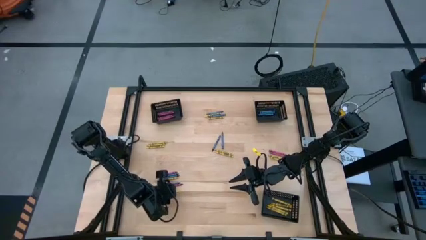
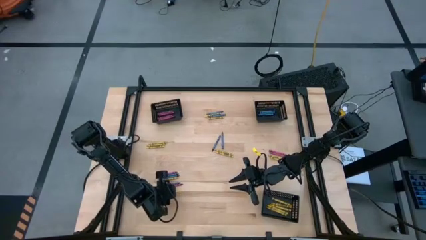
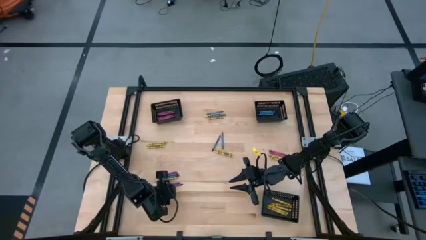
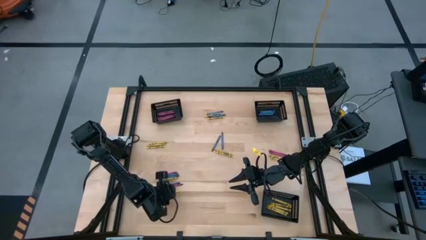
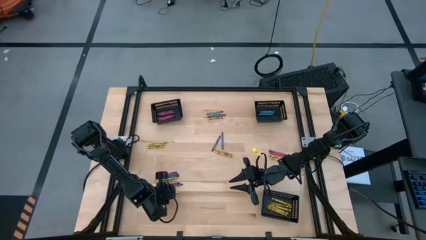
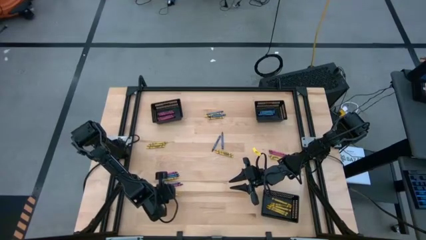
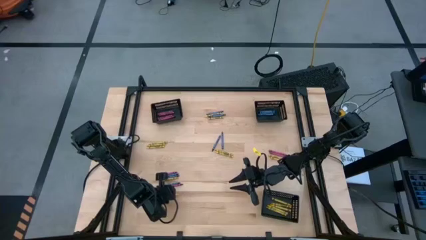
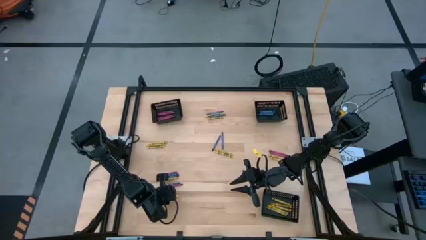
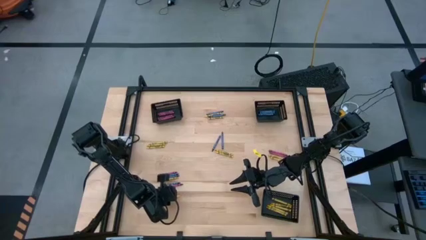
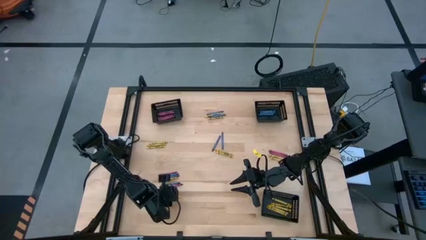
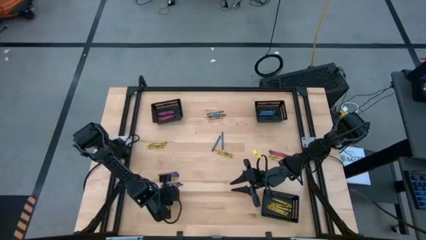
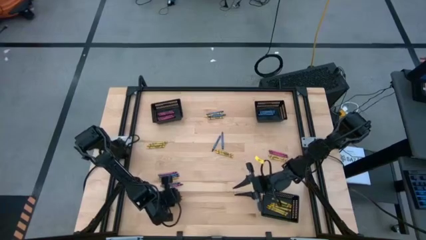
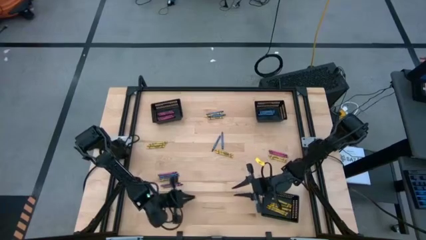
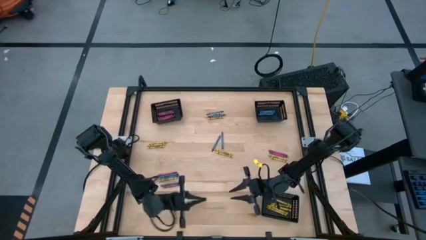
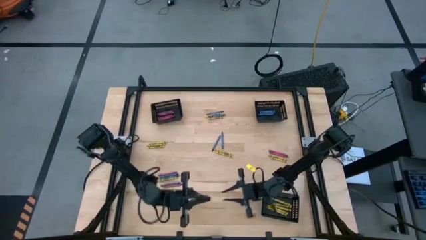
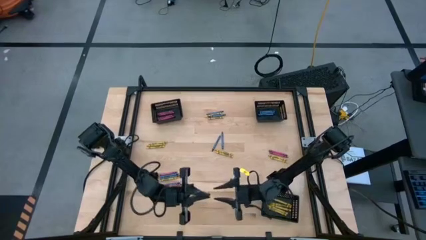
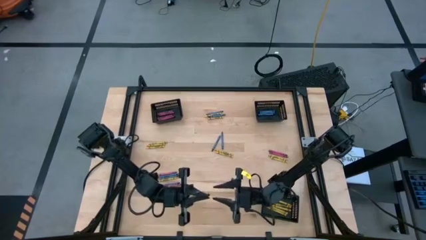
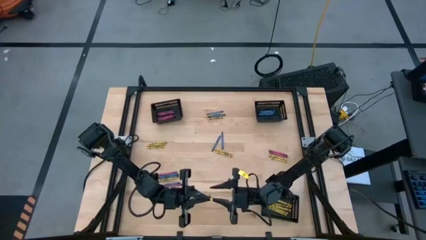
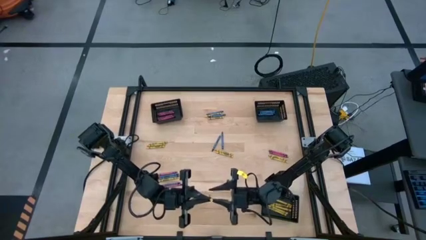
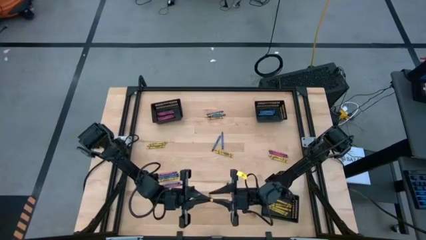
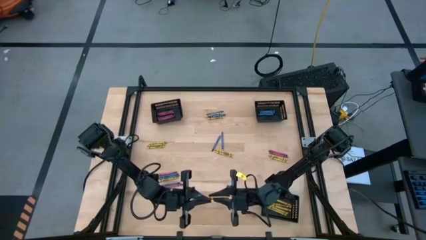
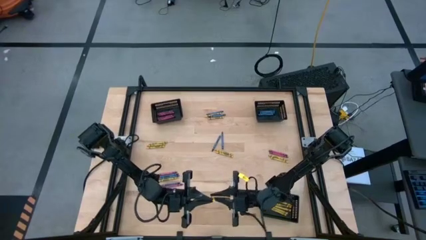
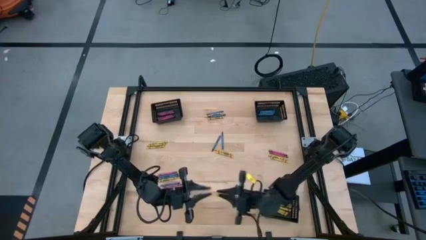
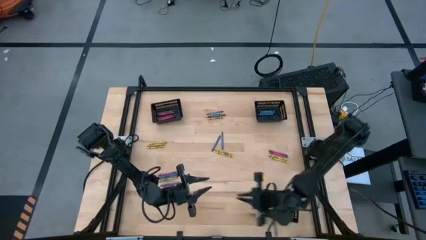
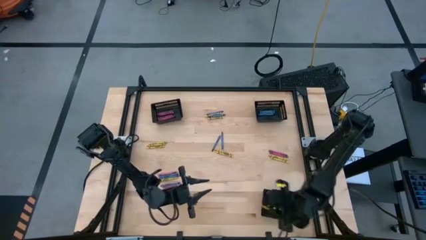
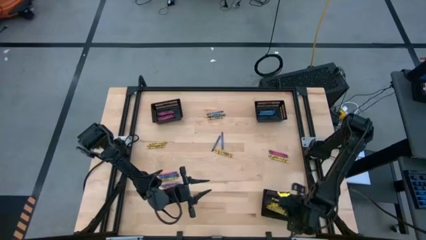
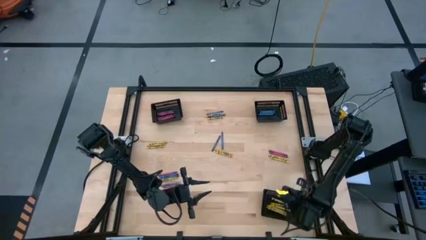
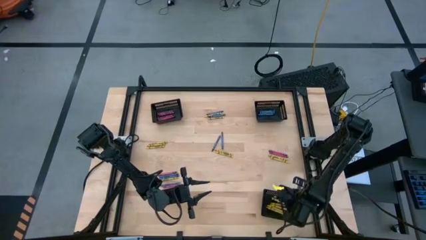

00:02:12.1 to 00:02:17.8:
Task: Sort crayons
Put the yellow crayon into the bottom black bin

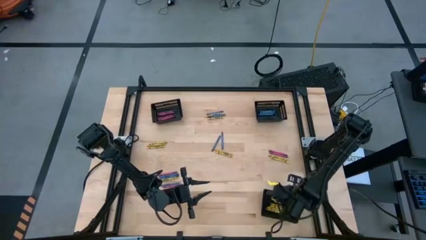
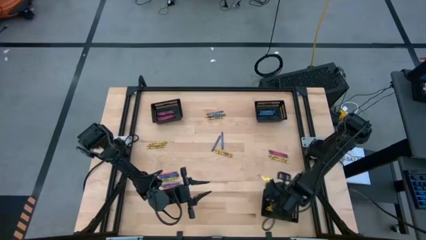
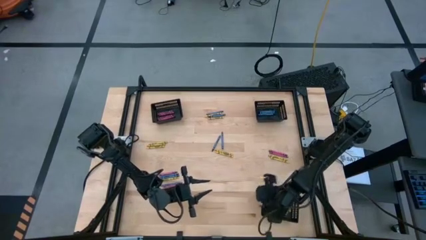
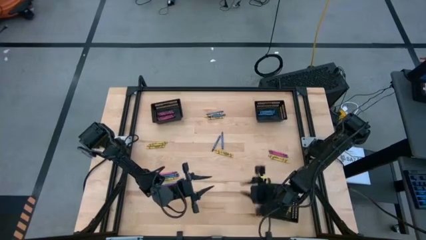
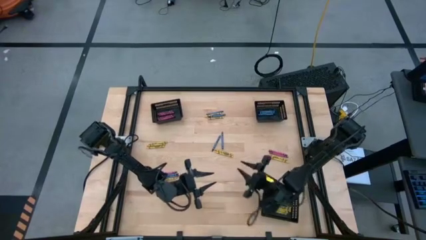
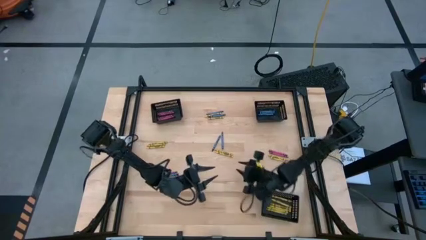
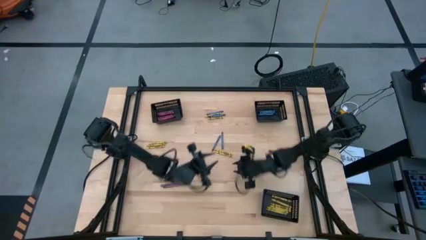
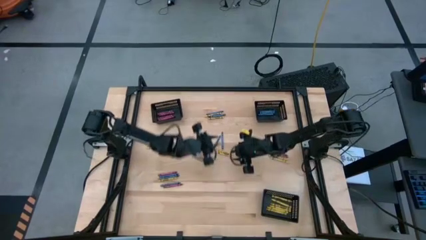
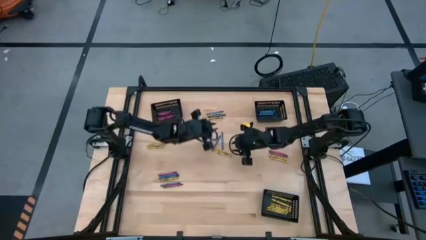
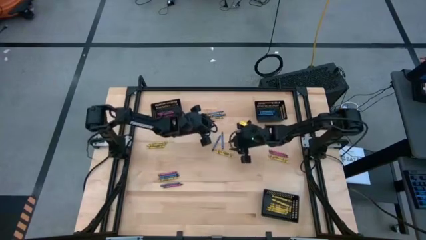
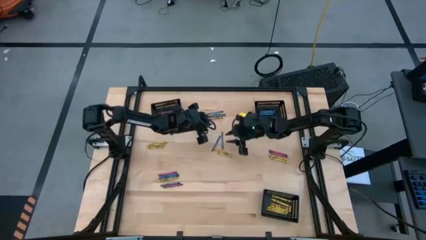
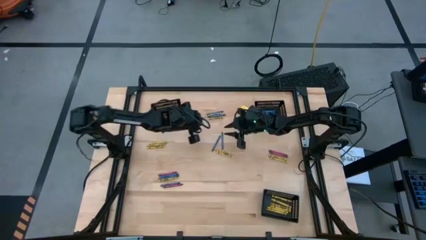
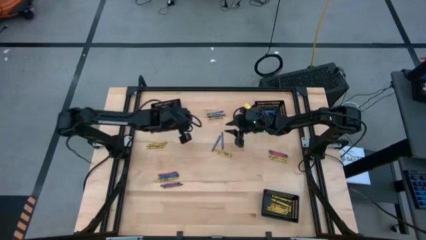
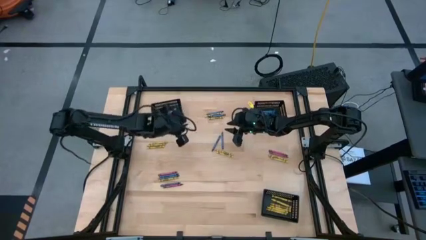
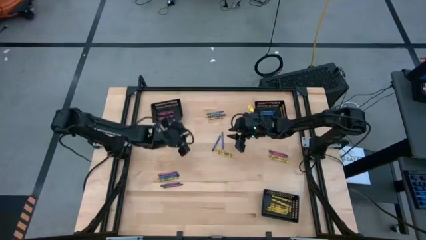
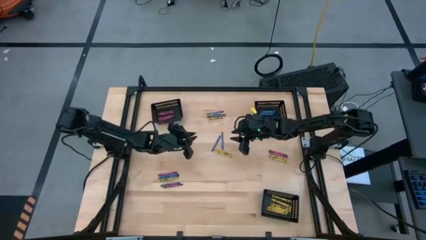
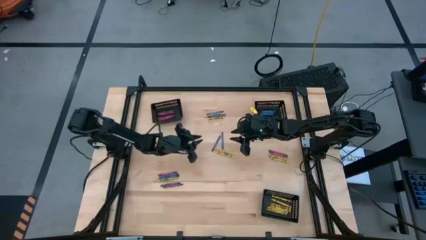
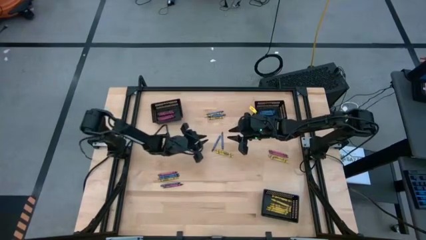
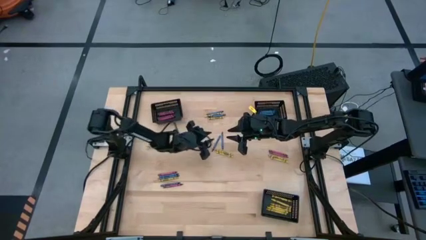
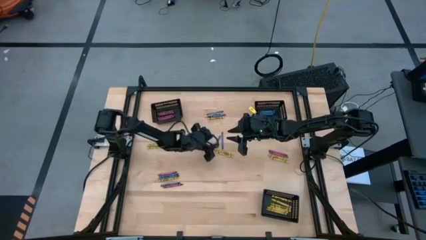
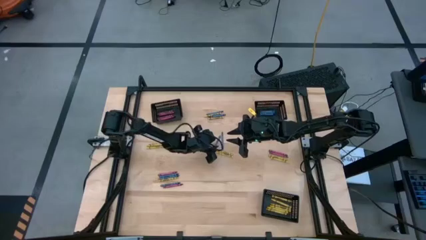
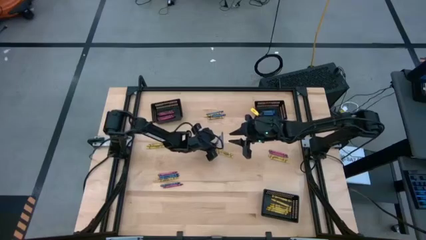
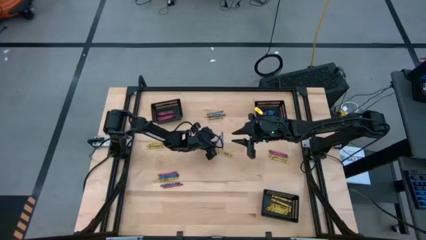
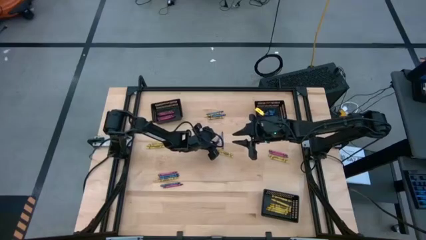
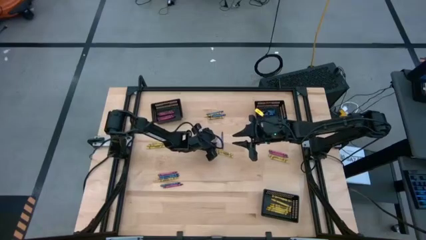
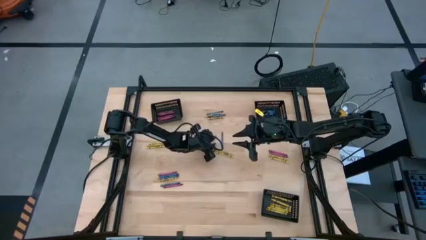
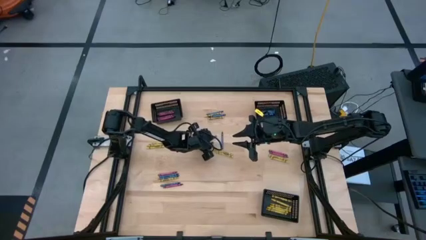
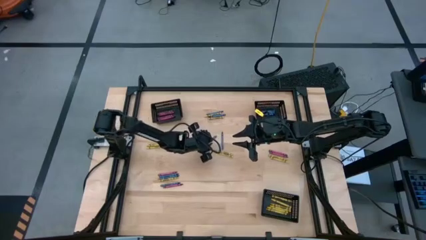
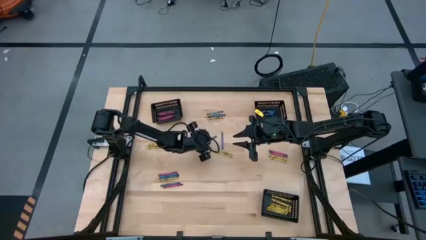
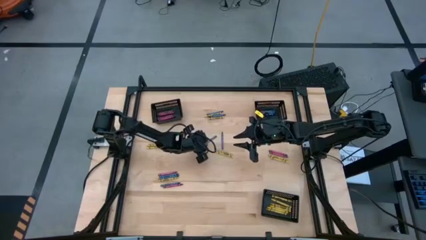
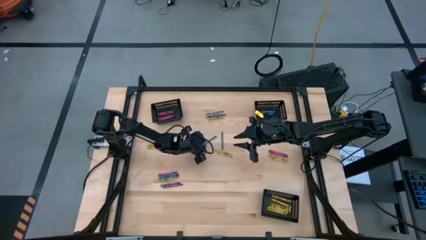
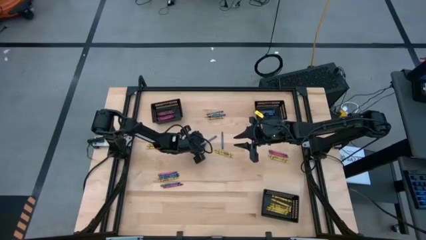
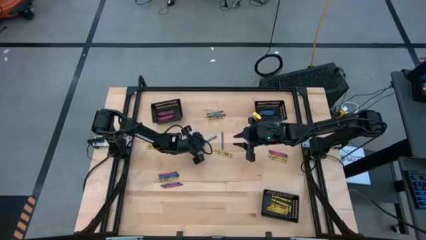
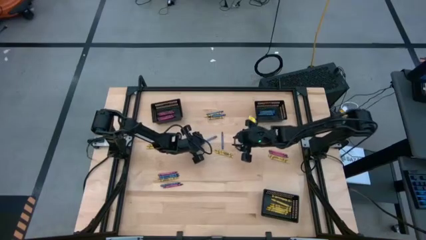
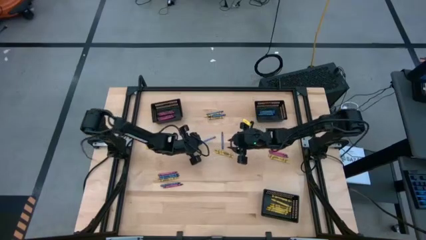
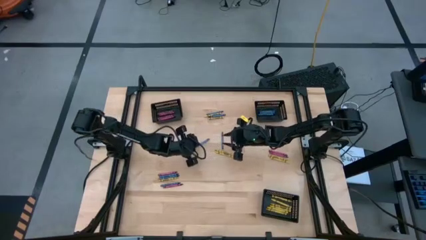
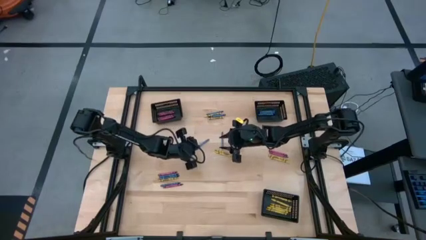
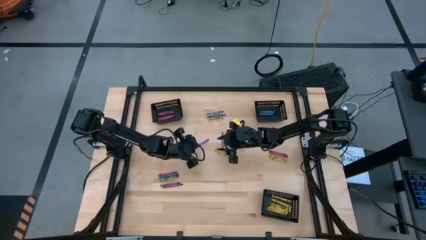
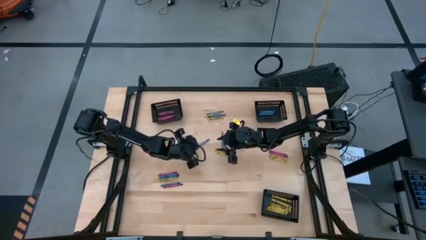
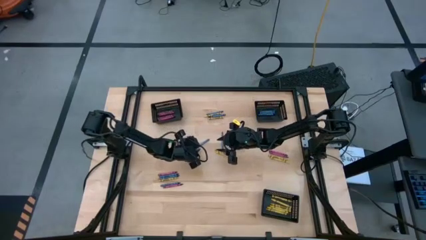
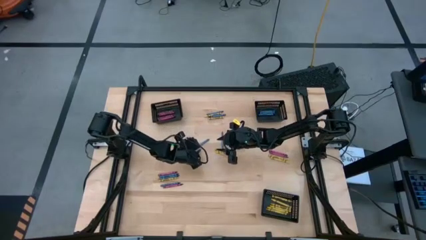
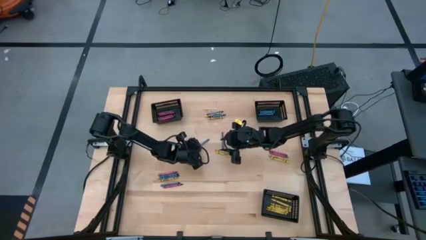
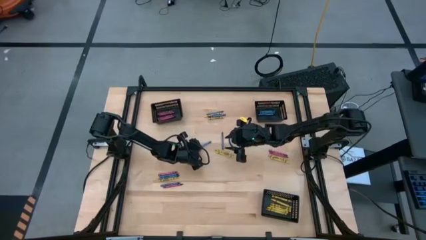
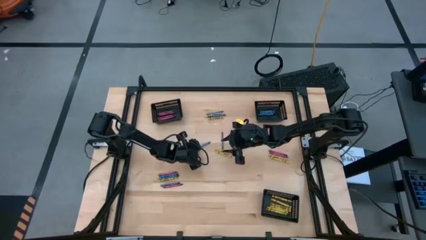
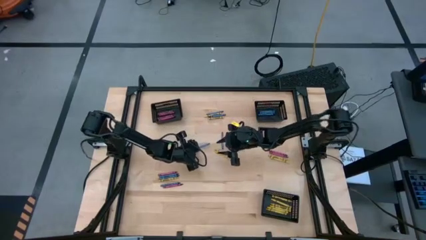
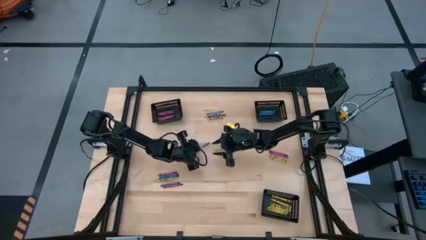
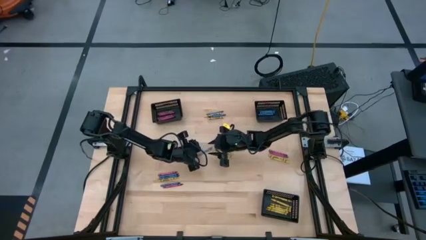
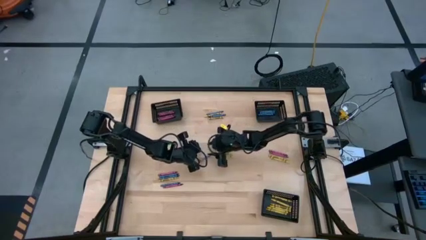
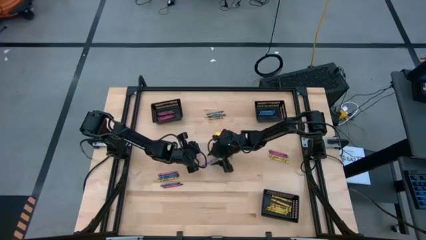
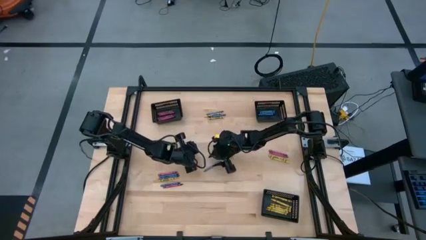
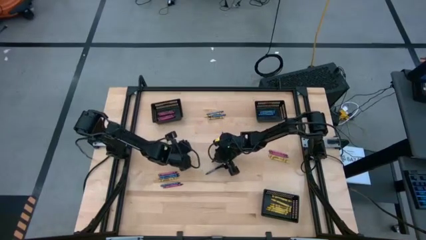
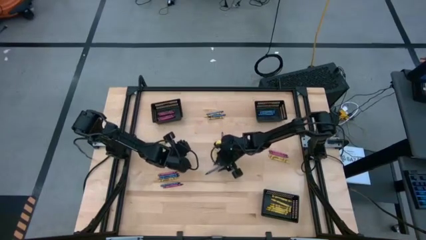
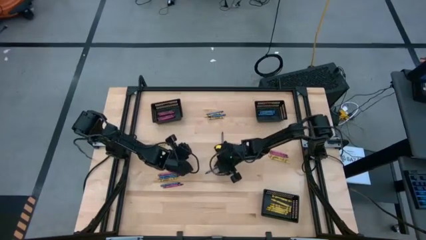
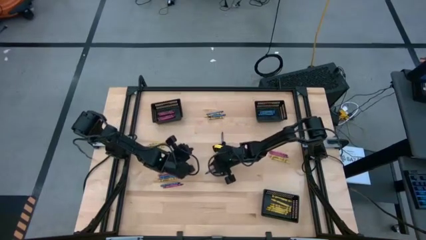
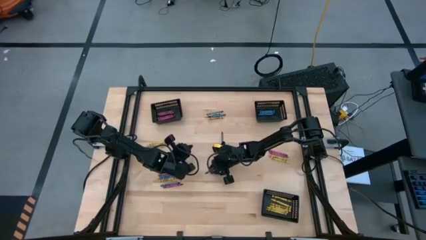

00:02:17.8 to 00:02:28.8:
Put the blue crayon into the top right black bin

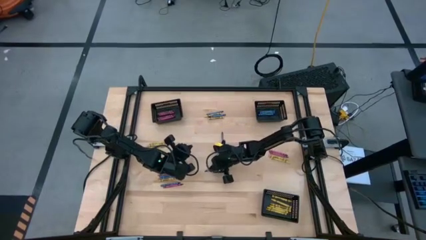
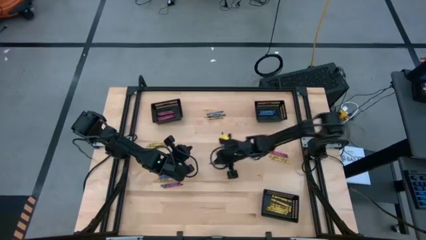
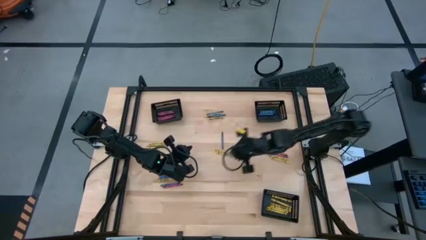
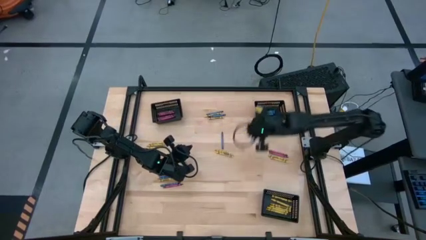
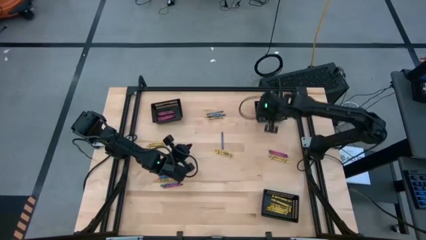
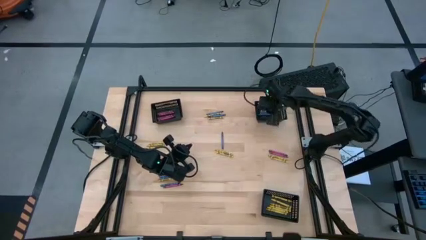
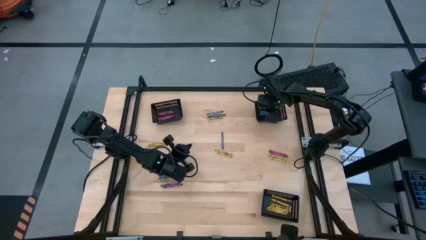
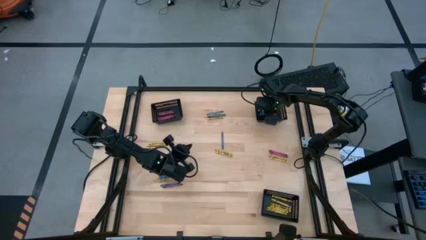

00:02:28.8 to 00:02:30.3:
Put the blue crayon into the top right black bin
